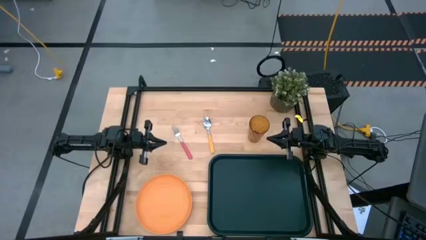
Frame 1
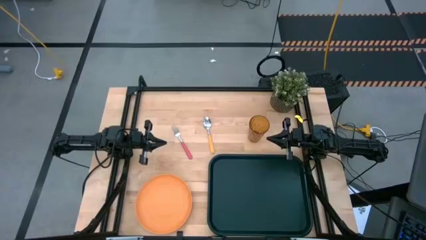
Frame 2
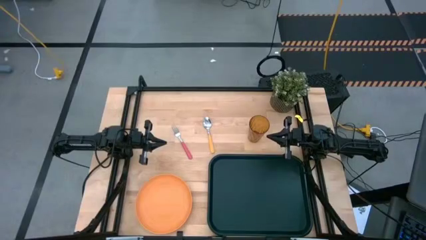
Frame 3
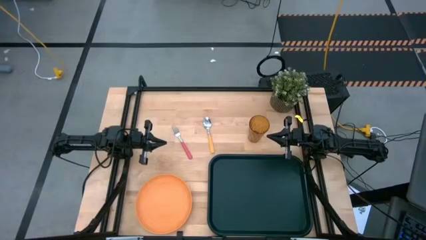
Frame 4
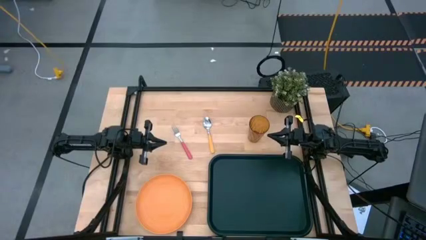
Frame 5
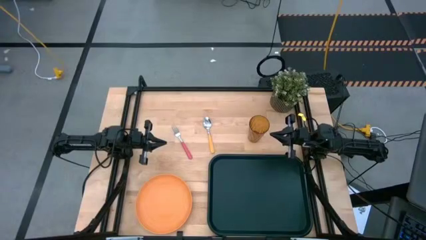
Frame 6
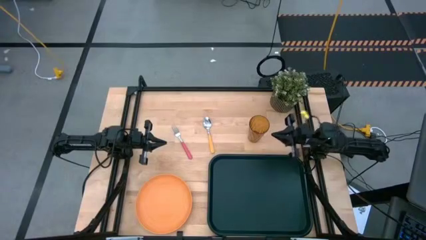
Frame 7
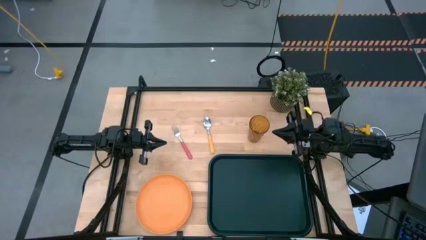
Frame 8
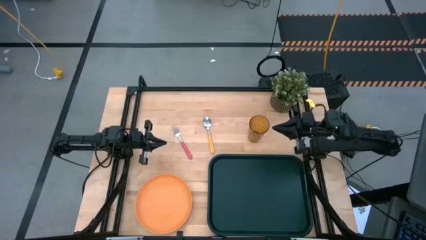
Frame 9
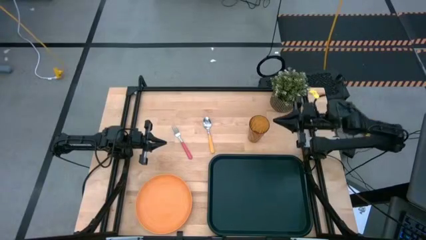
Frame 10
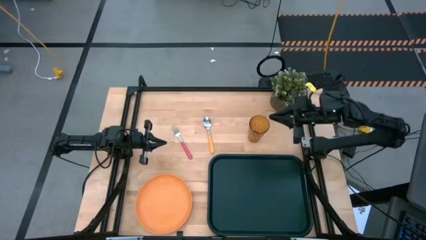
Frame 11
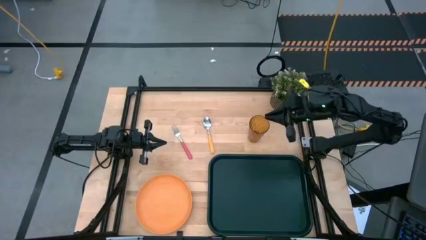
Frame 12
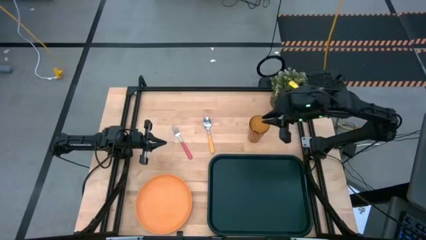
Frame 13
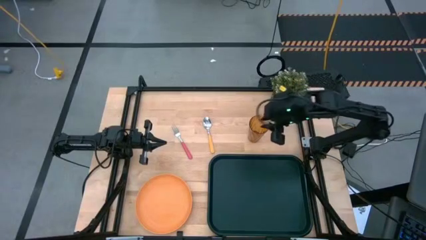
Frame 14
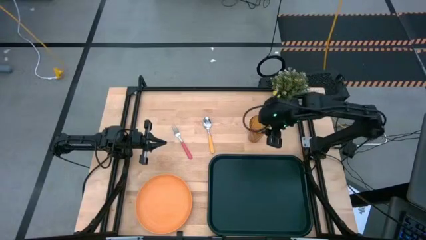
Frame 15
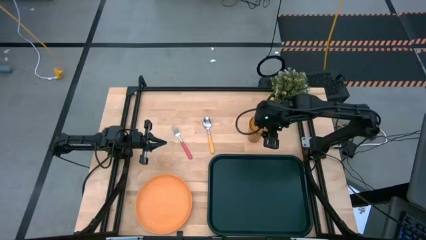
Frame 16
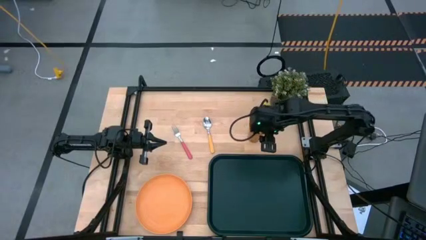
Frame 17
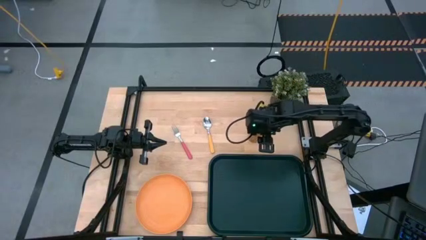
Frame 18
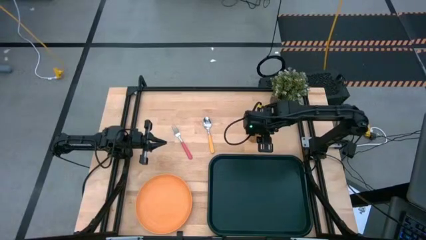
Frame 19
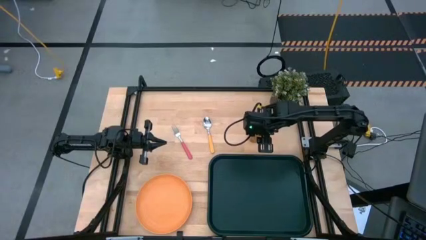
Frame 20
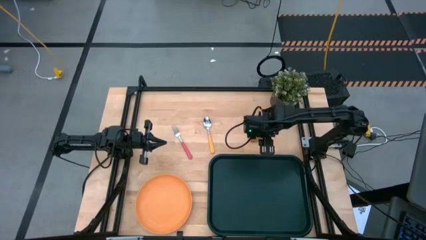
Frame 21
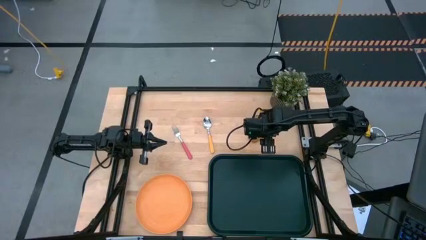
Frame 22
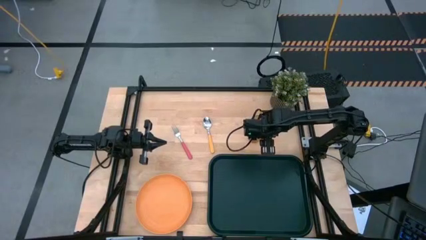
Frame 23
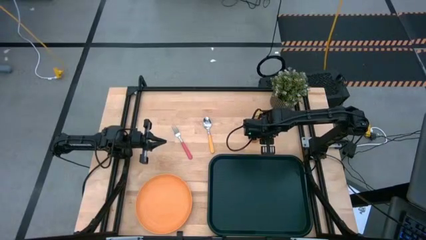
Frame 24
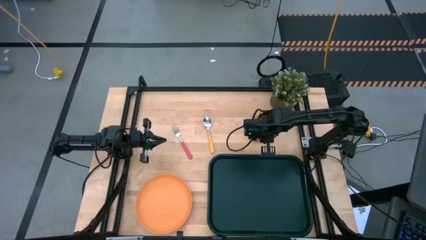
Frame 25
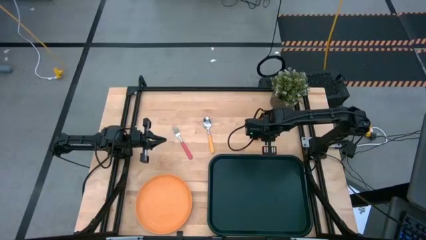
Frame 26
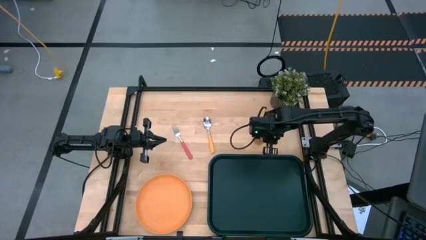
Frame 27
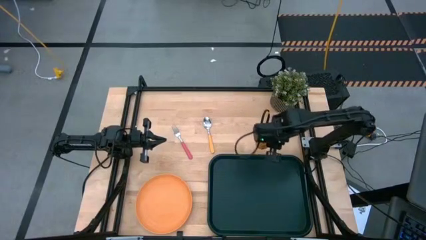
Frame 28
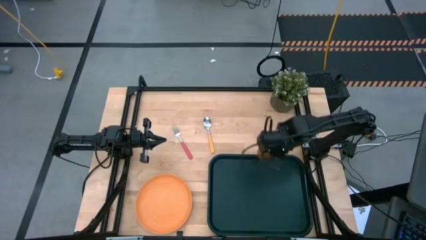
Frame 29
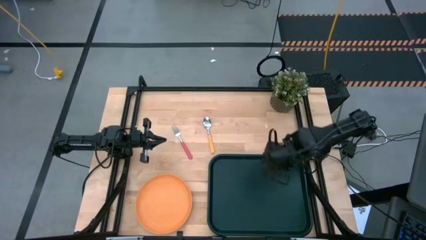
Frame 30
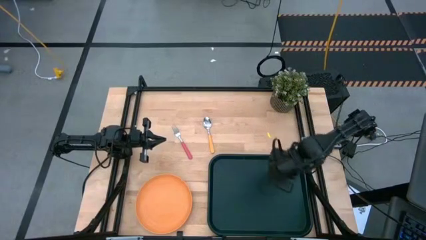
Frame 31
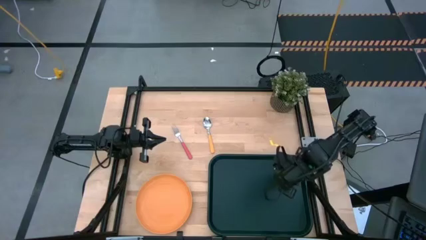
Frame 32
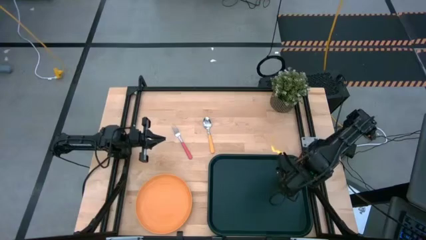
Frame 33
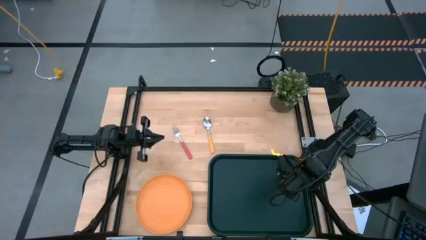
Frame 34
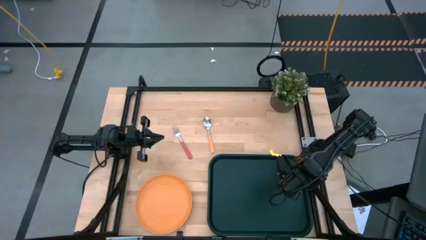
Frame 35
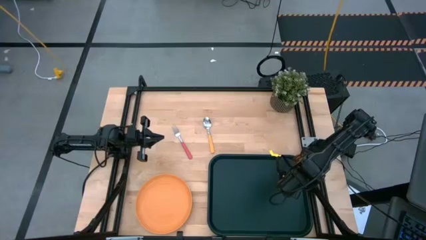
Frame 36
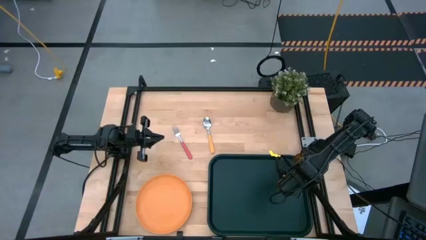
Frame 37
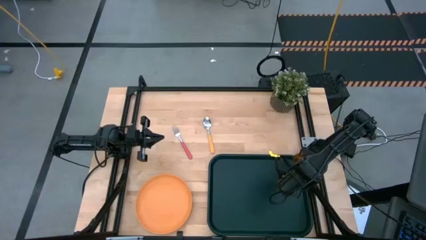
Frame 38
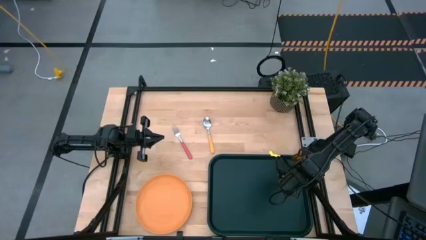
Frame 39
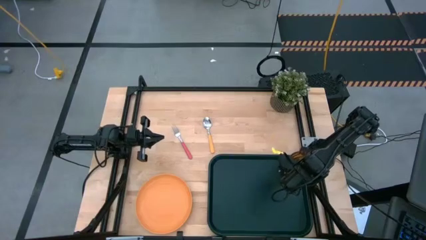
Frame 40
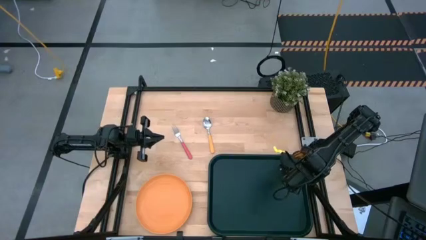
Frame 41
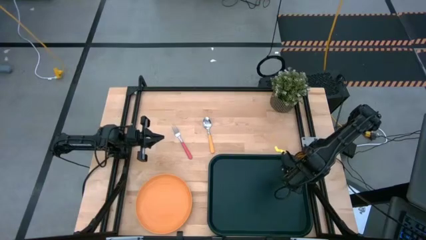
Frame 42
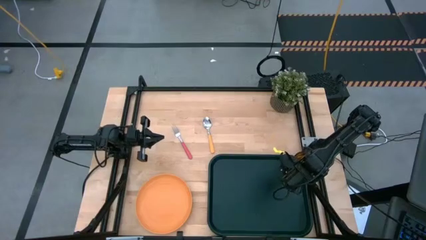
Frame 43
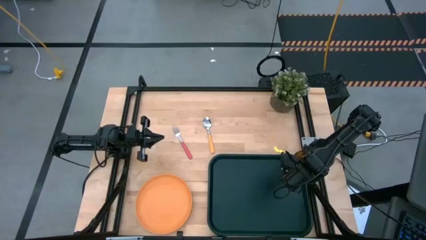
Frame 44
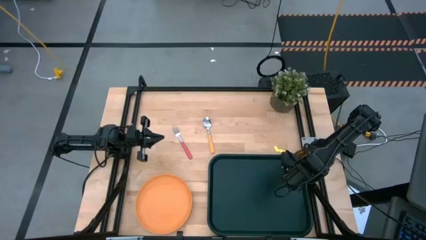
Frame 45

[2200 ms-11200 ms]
Task: Pick and place plate/cup/fork/spoon on tray
Put the brown cup on the top right of the black tray

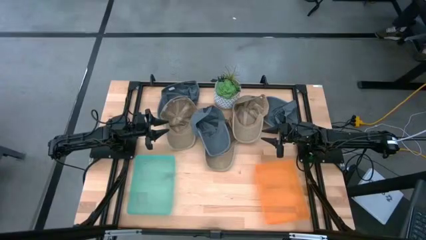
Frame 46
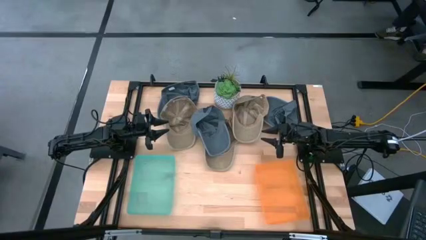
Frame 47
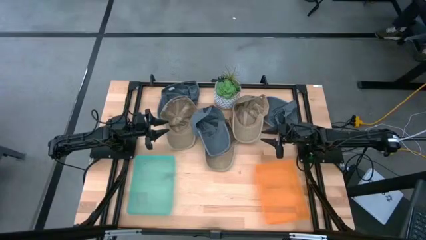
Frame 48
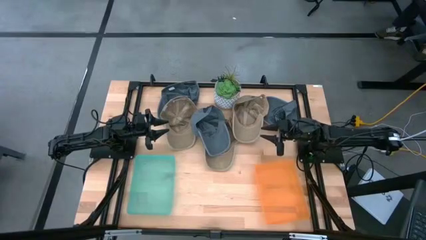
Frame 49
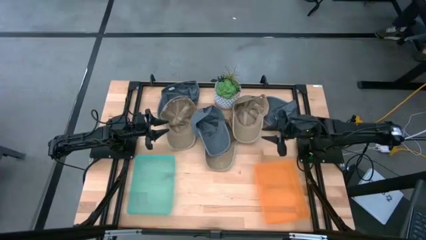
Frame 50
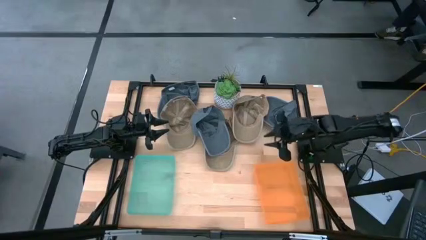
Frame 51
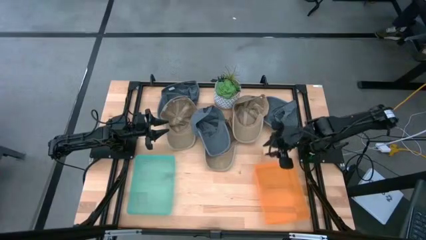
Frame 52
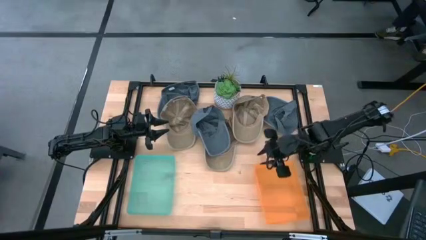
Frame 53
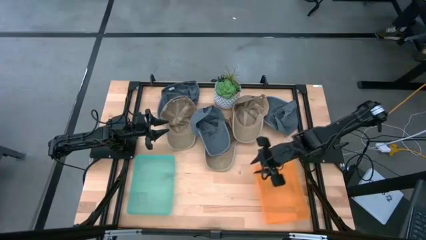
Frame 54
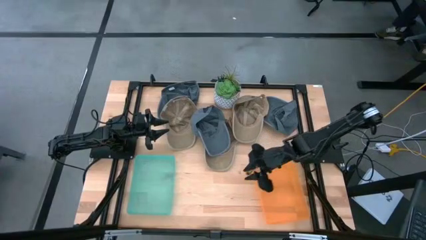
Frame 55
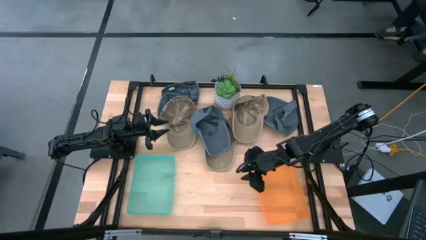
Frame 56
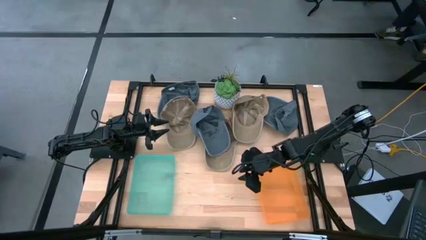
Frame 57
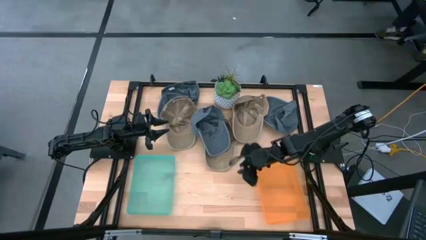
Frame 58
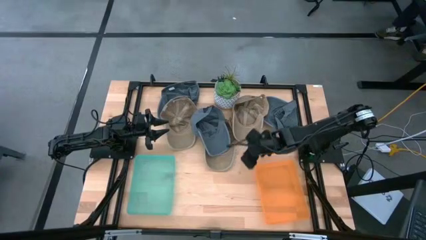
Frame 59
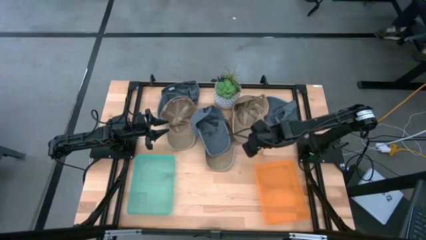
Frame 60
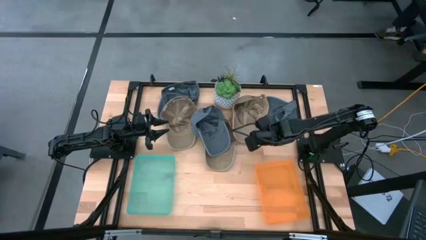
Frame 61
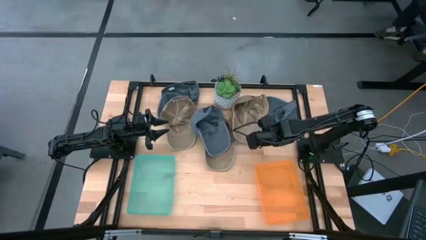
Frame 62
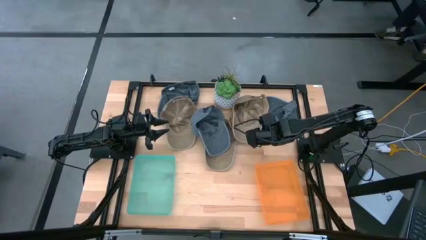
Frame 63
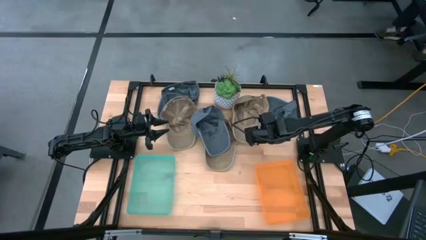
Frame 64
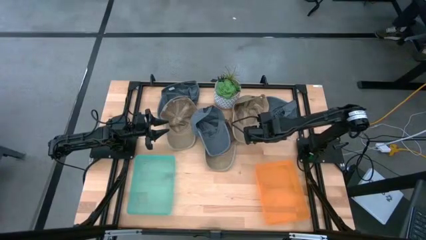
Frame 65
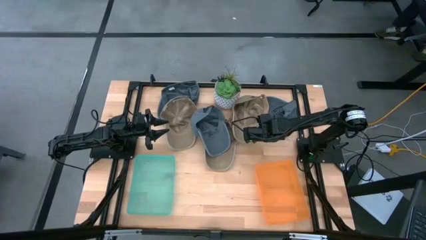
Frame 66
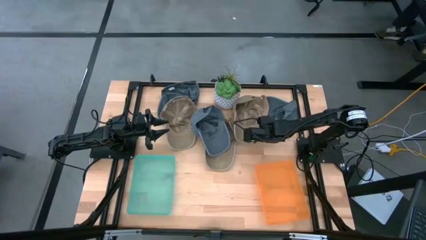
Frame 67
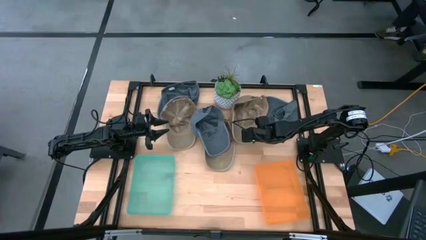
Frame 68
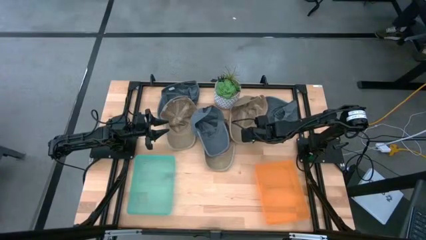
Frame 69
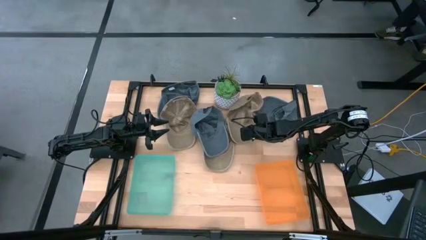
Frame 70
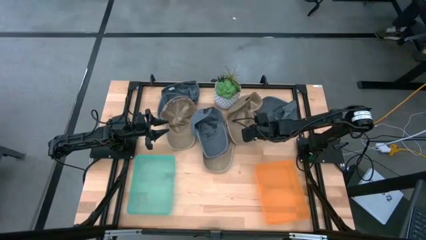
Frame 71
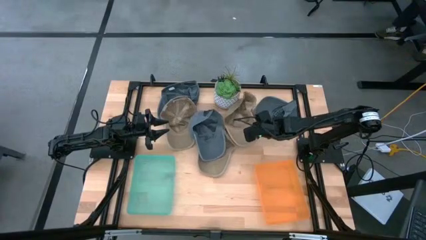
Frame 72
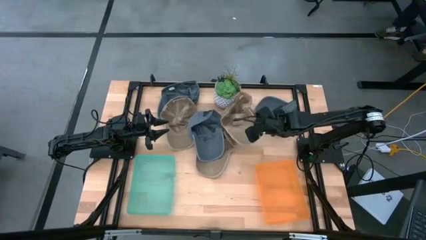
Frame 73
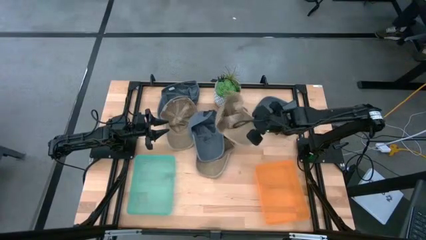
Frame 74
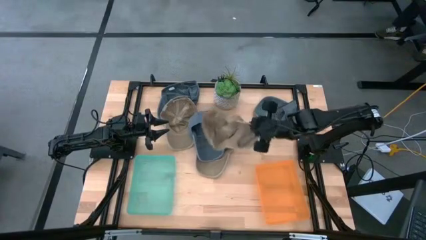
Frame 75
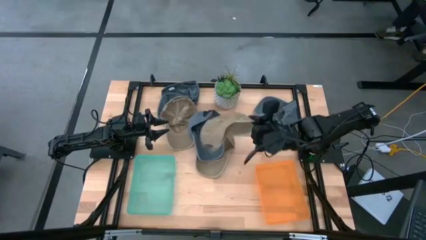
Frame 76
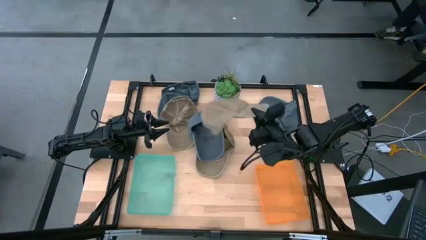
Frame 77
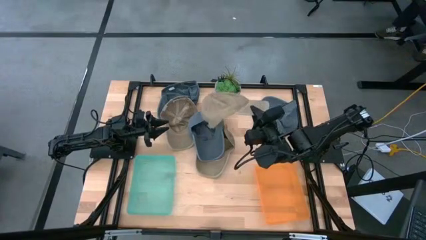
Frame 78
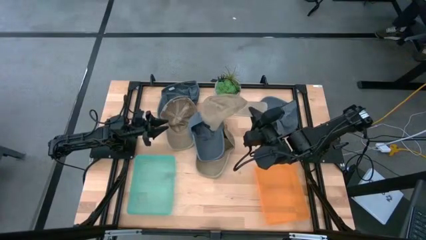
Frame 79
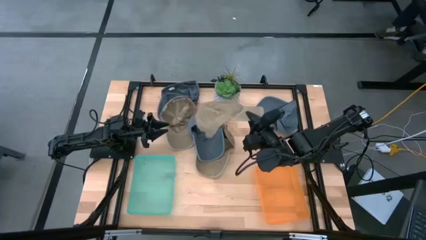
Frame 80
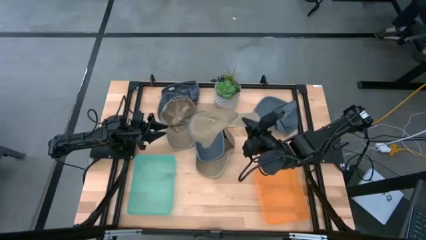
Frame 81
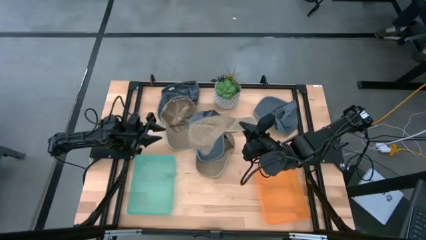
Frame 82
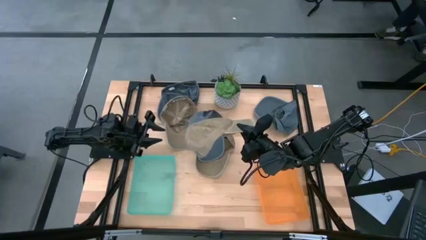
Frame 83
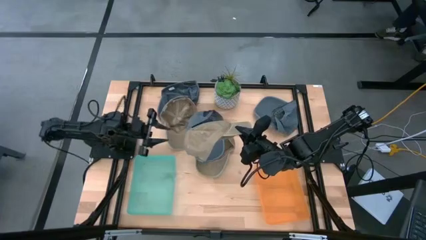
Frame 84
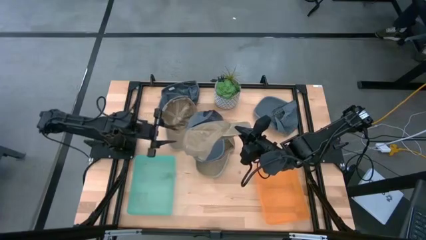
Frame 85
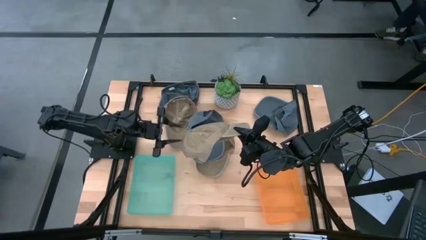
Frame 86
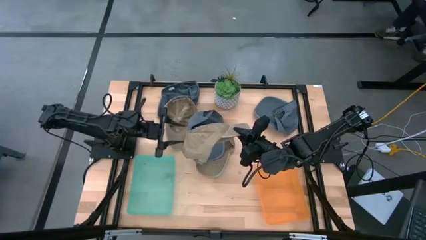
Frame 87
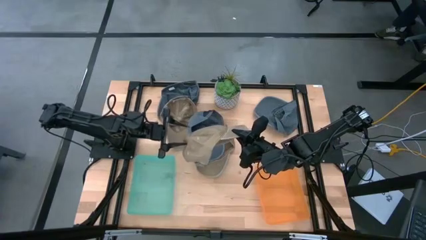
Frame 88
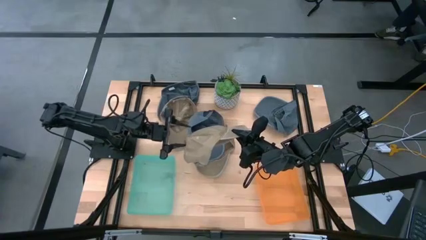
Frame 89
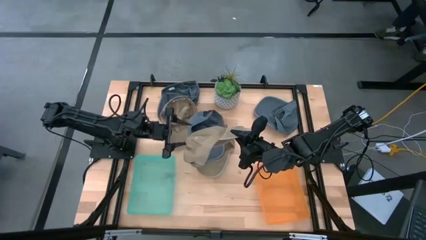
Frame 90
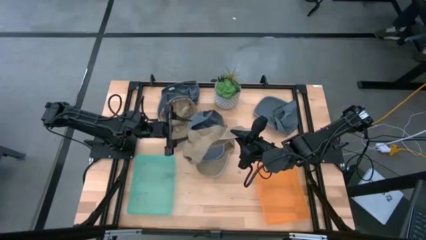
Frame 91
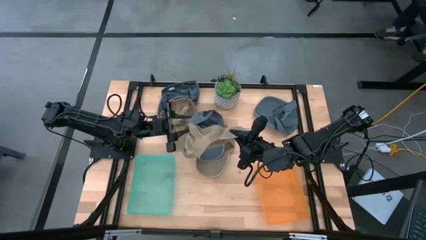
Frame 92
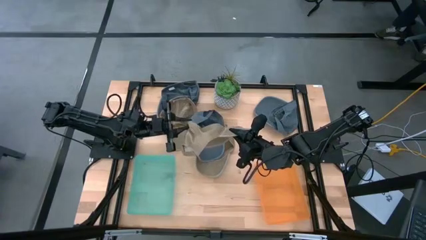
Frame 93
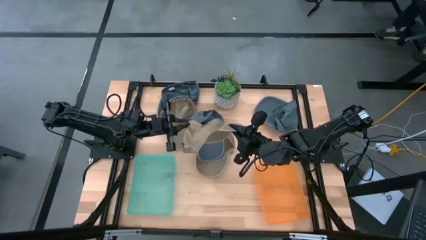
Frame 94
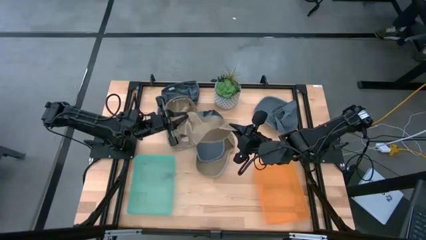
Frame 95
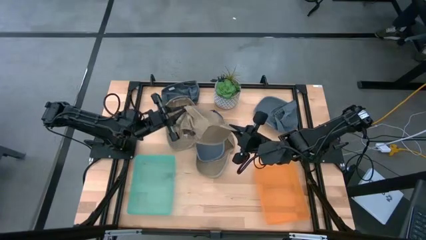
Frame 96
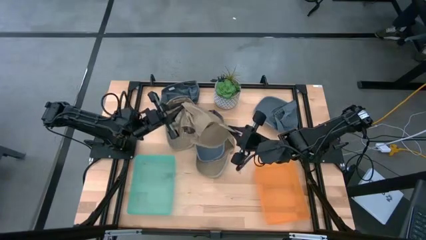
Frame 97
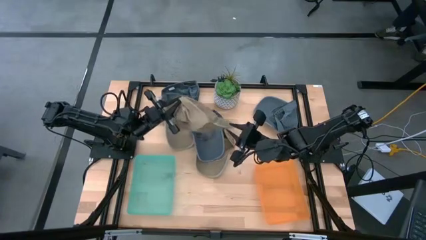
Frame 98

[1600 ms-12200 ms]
Task: Pick & Place hat
Put the top right brown cap into the orange bin
